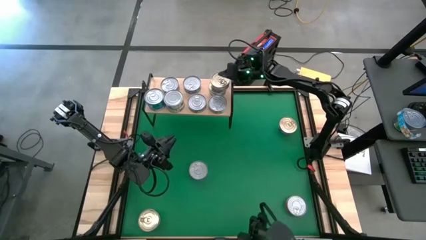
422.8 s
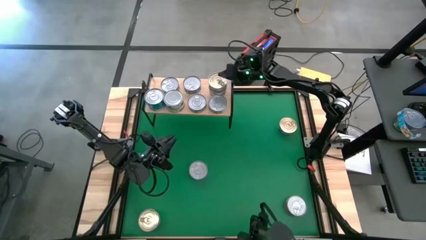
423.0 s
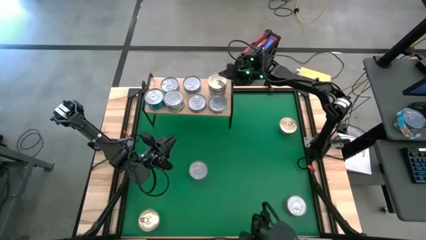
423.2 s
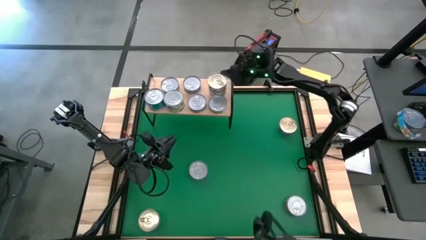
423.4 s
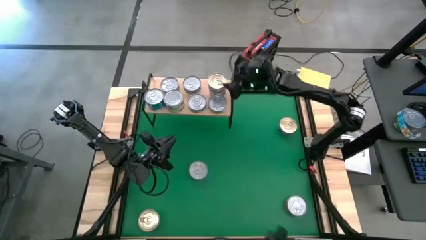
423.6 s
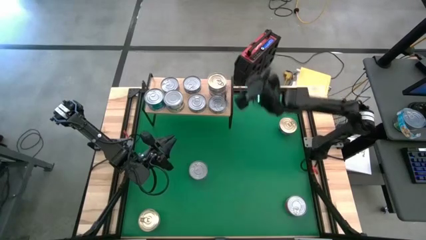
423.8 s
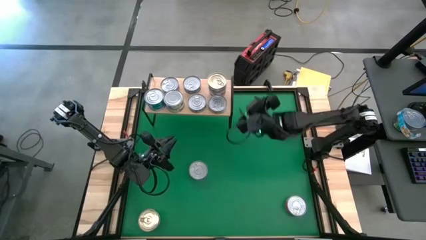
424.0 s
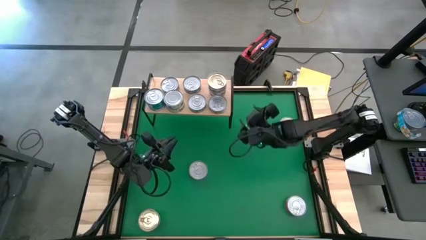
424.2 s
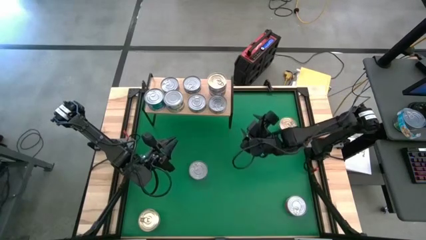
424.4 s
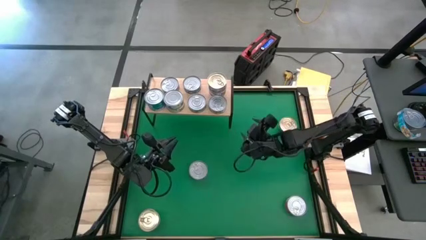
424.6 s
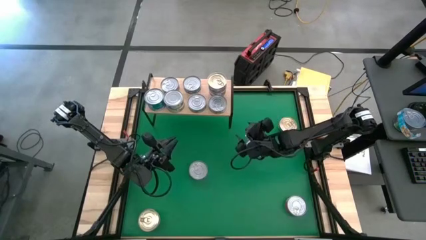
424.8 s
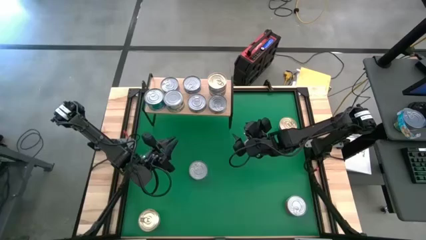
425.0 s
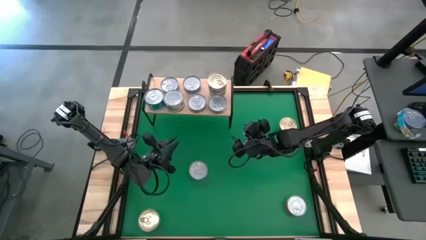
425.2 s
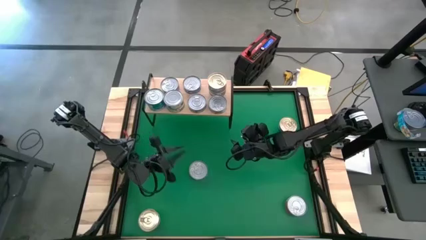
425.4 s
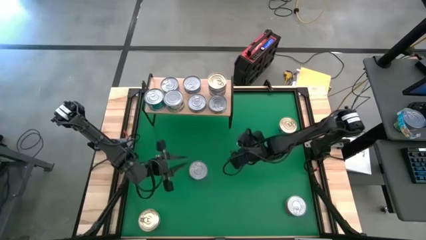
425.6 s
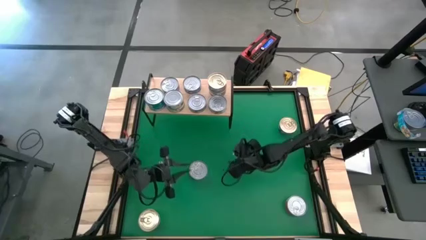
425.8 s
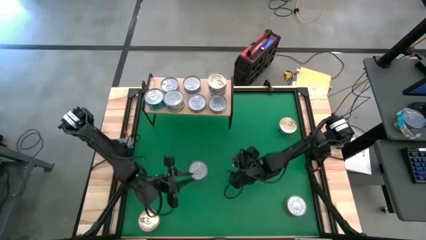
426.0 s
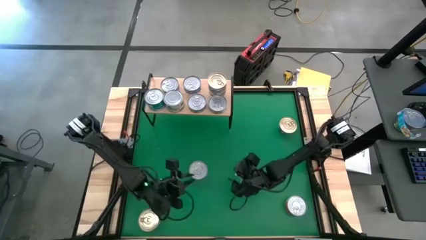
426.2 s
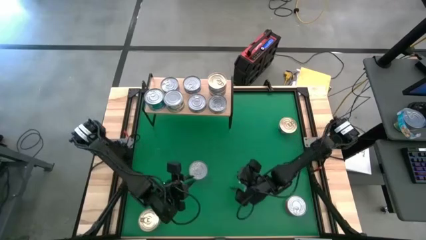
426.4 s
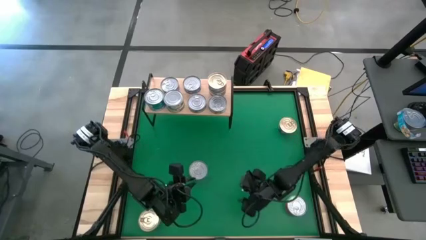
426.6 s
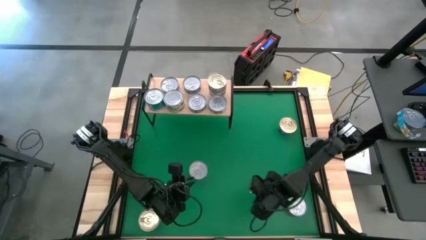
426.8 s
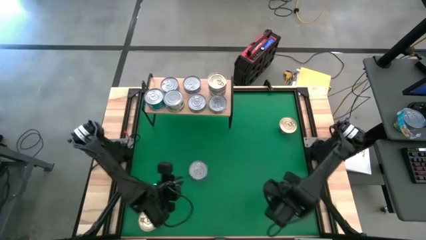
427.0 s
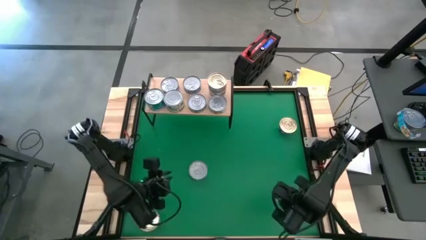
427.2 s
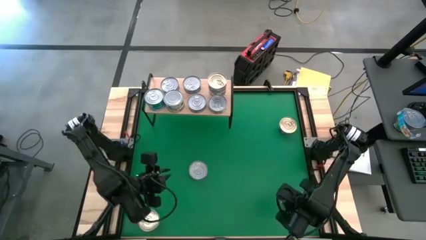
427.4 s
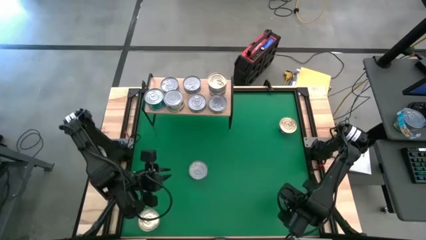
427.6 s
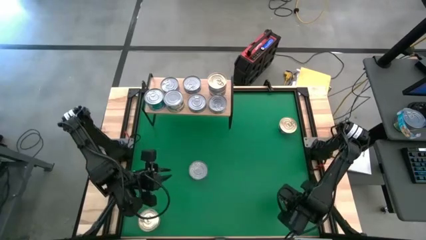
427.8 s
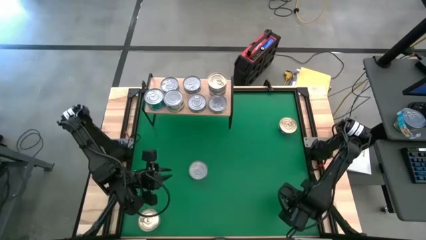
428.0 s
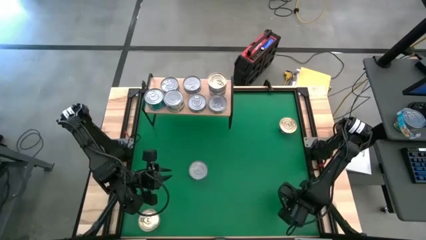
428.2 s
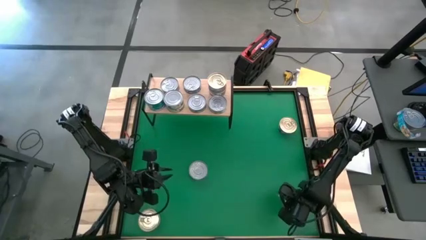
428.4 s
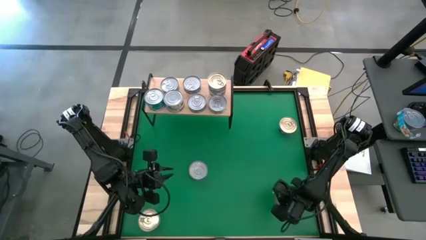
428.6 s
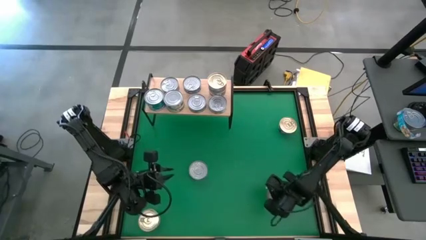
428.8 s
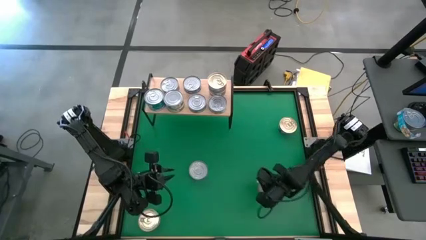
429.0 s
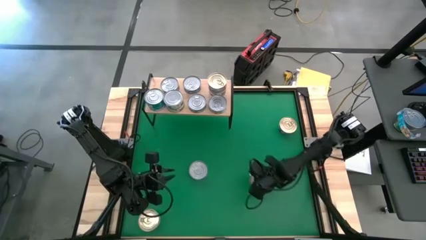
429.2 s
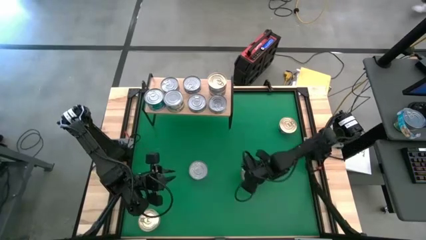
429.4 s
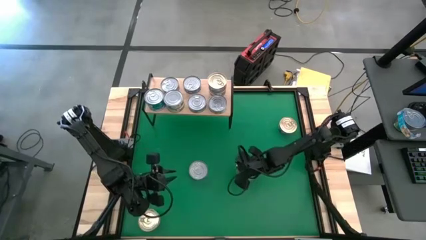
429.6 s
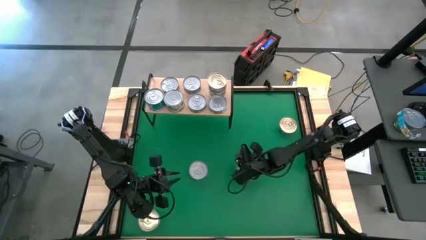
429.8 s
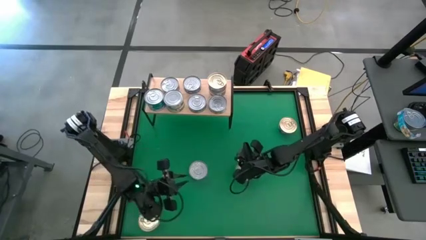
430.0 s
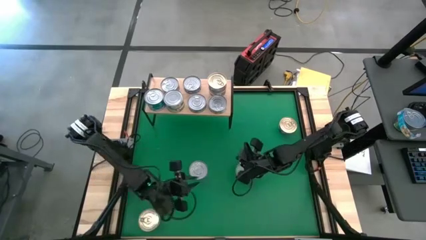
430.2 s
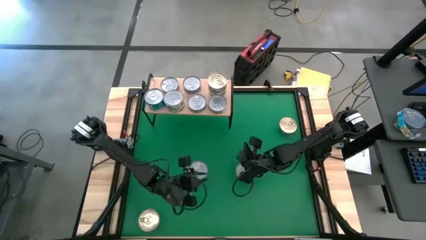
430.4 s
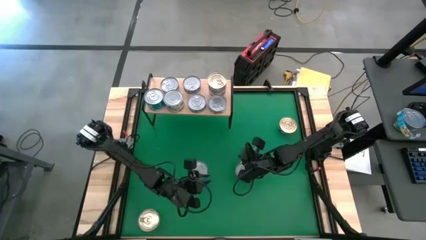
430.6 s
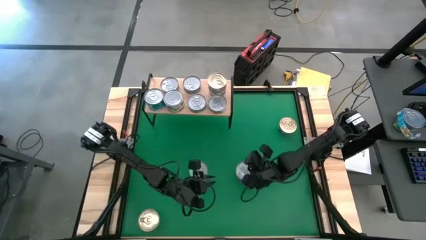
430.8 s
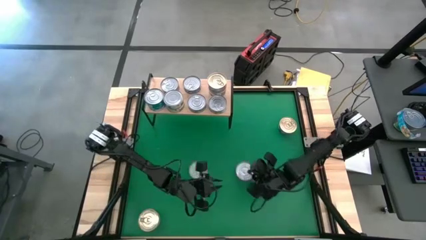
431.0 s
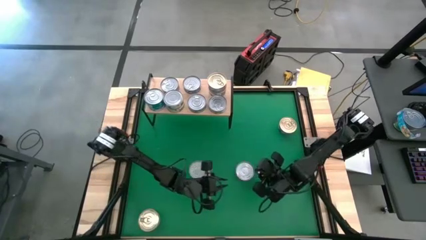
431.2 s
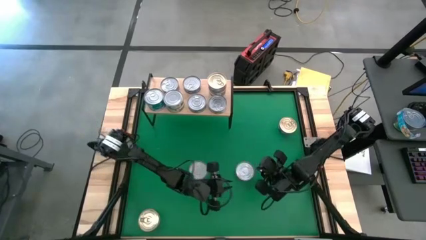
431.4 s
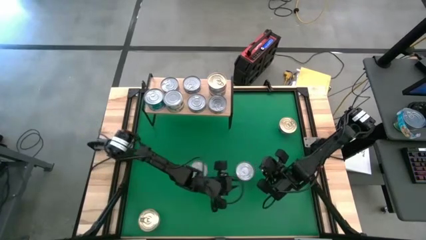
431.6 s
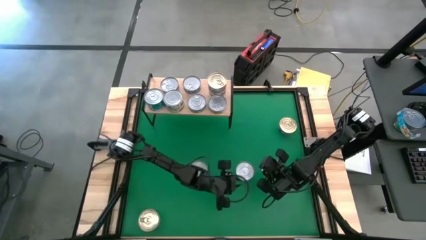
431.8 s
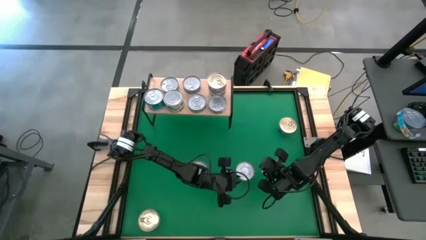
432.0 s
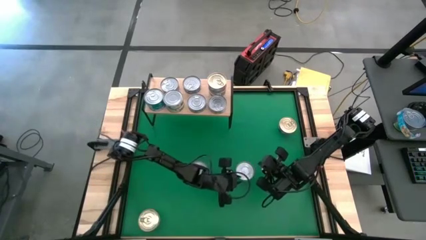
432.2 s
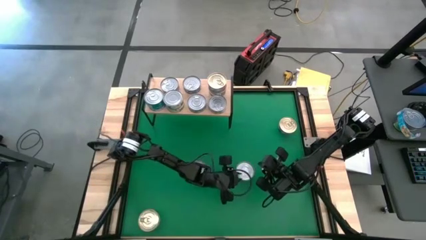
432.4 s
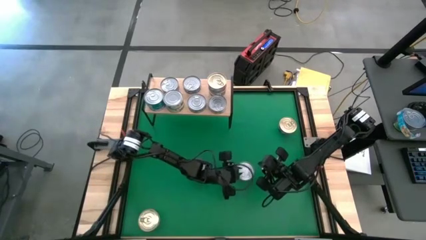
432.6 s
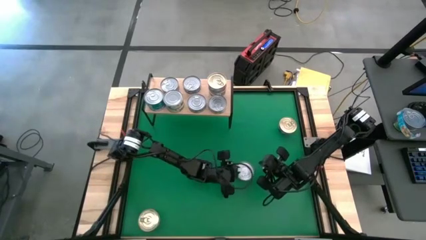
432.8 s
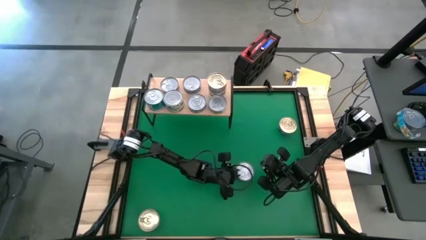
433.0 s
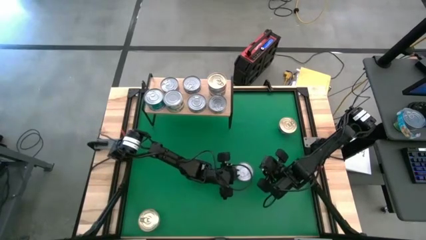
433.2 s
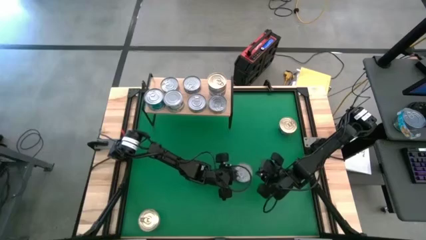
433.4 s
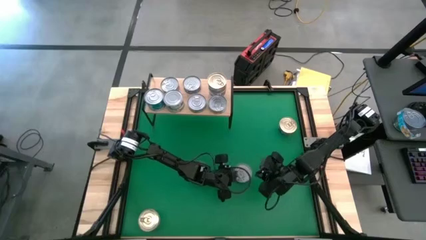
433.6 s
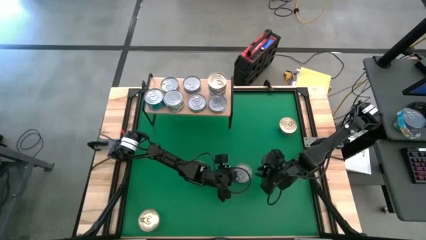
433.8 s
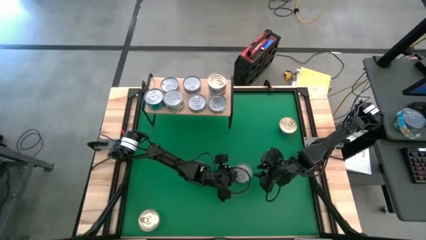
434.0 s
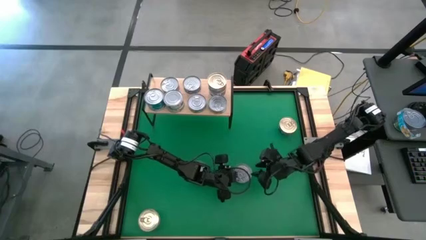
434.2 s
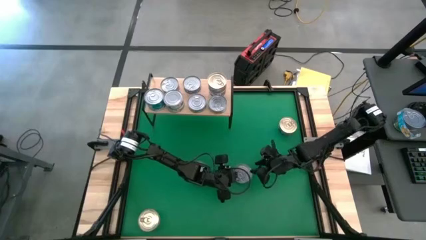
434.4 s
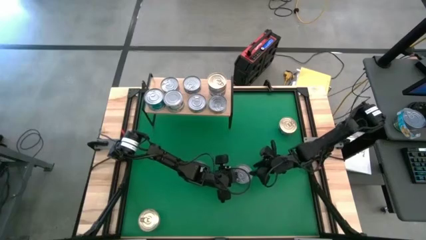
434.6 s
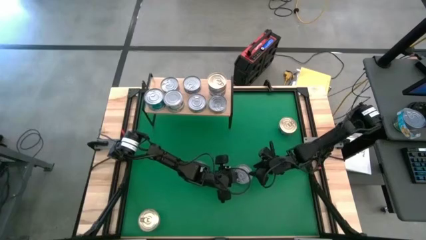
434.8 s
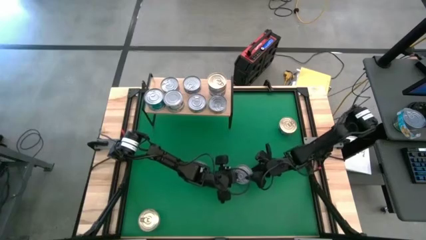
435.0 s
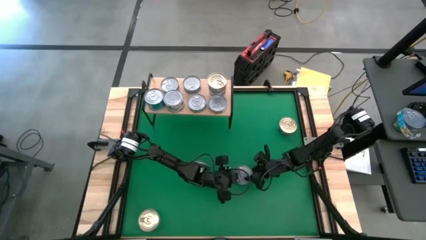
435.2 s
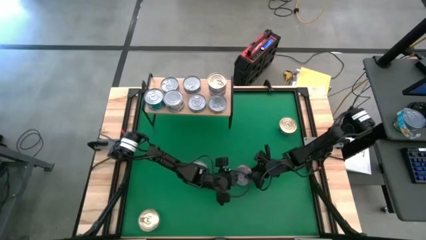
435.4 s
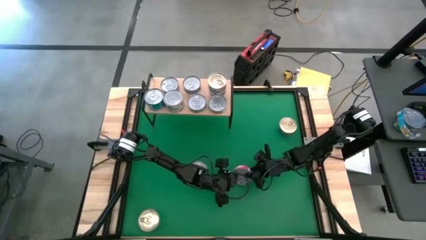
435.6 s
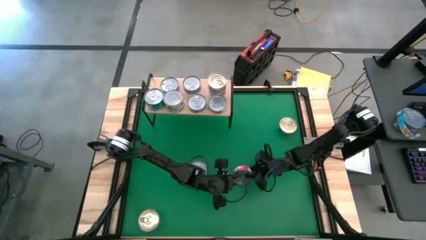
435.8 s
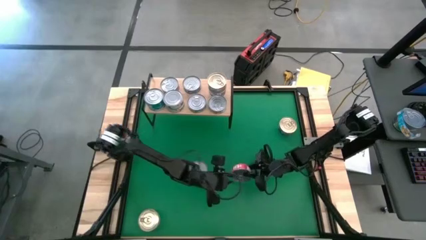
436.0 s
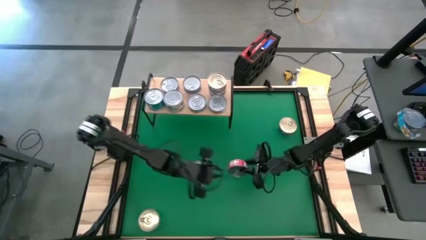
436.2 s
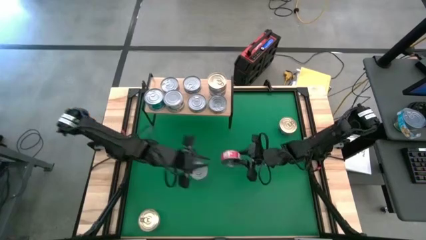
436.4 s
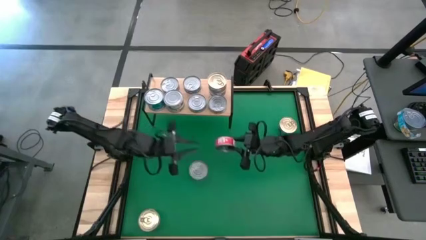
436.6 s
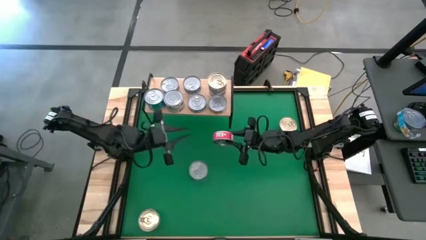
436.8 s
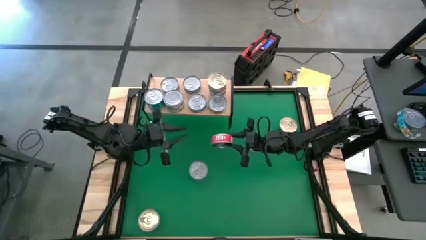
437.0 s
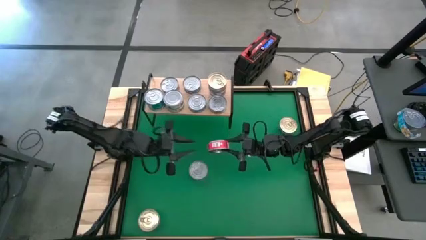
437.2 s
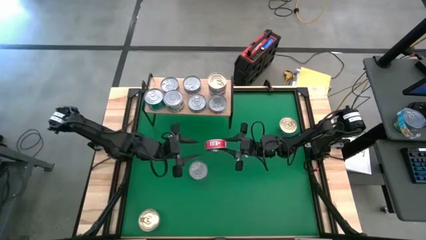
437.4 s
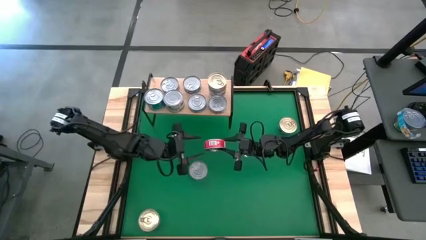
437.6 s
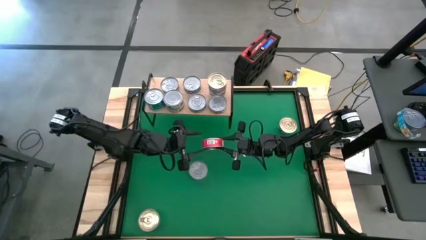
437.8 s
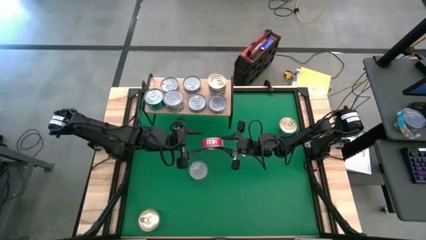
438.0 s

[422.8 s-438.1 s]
Task: Stack canned seafood by type on shelf
Stack the red tuna can on top of the red tuna can on the shelf
